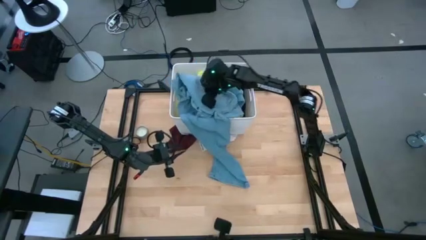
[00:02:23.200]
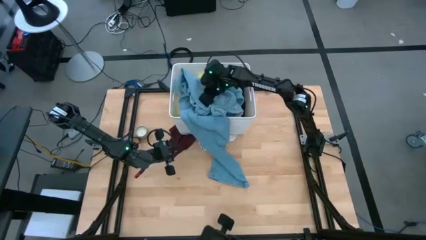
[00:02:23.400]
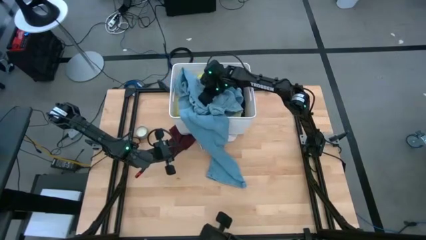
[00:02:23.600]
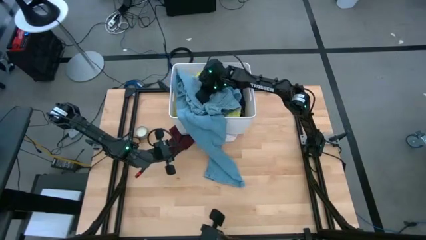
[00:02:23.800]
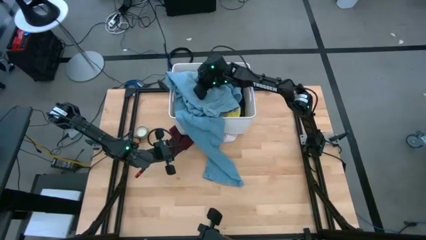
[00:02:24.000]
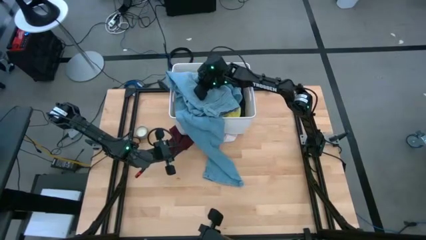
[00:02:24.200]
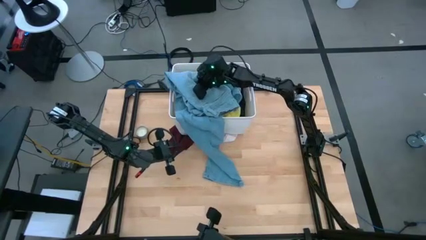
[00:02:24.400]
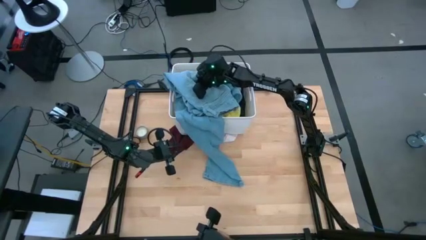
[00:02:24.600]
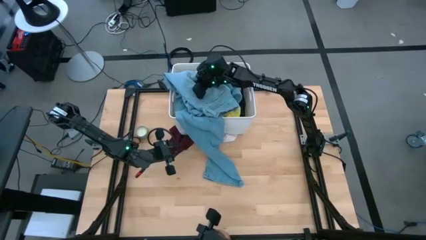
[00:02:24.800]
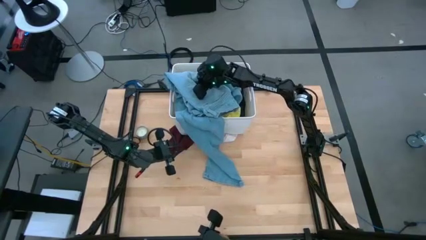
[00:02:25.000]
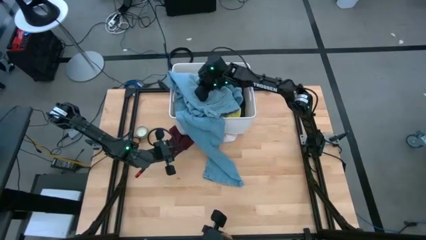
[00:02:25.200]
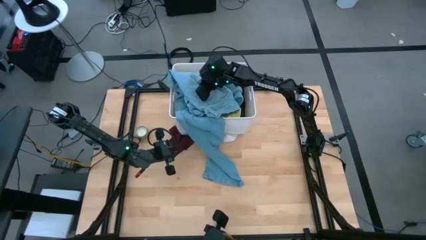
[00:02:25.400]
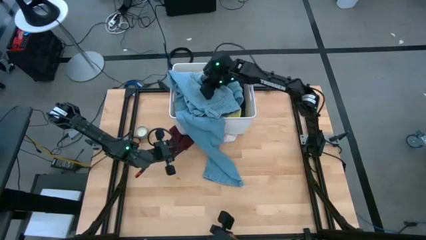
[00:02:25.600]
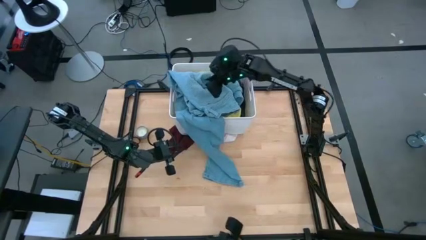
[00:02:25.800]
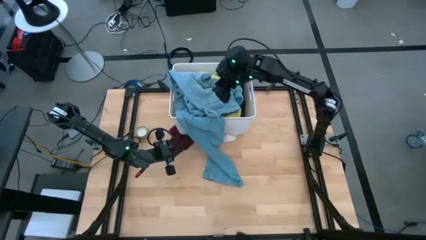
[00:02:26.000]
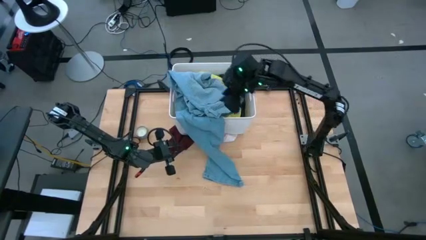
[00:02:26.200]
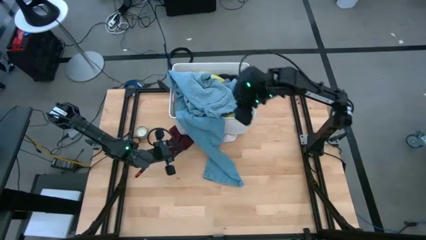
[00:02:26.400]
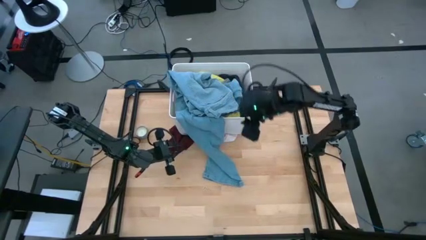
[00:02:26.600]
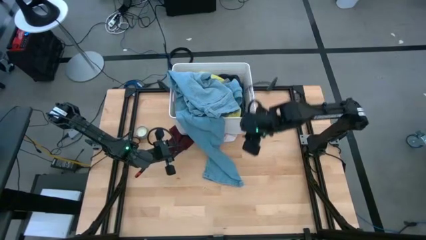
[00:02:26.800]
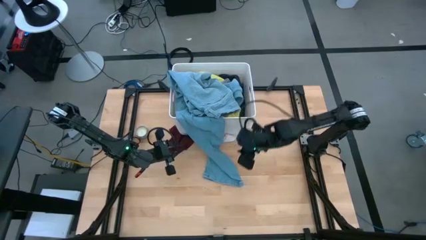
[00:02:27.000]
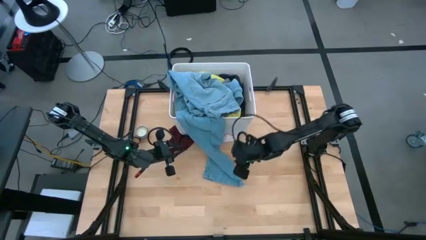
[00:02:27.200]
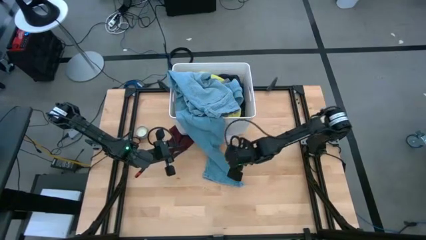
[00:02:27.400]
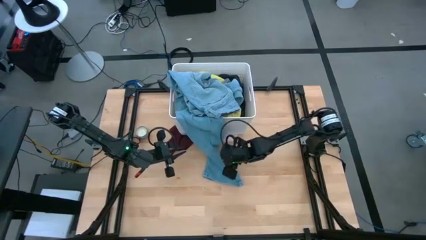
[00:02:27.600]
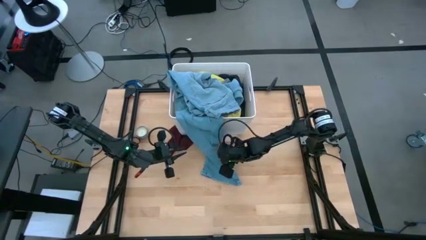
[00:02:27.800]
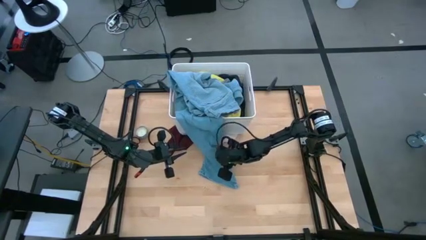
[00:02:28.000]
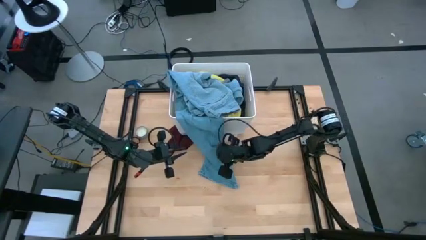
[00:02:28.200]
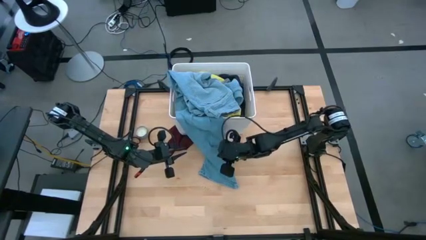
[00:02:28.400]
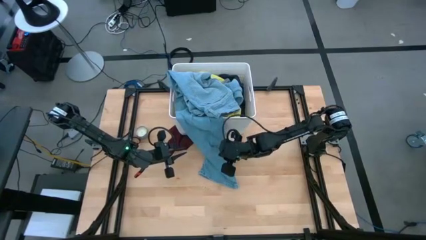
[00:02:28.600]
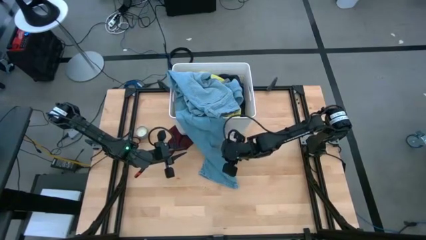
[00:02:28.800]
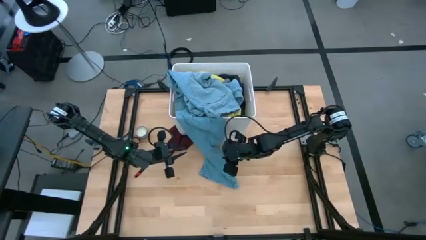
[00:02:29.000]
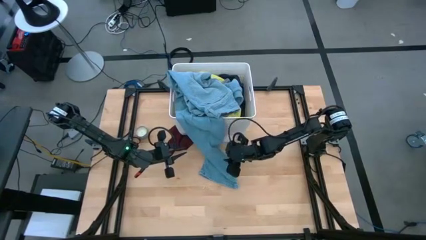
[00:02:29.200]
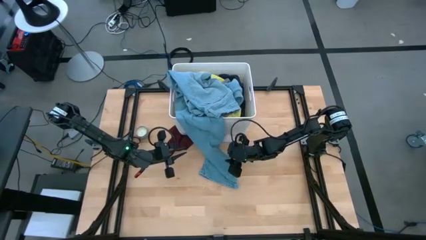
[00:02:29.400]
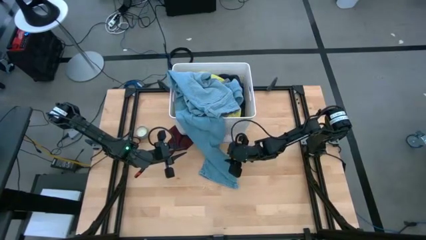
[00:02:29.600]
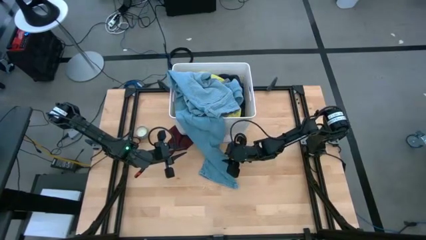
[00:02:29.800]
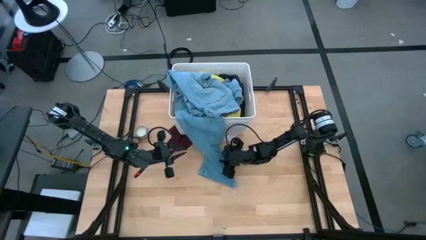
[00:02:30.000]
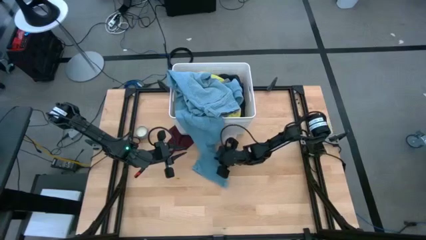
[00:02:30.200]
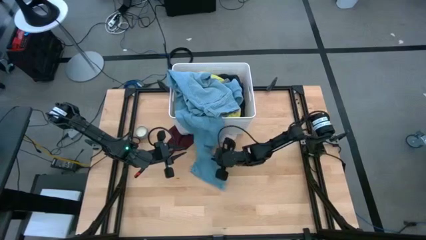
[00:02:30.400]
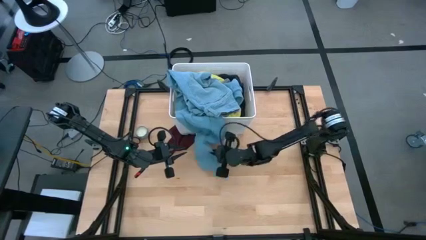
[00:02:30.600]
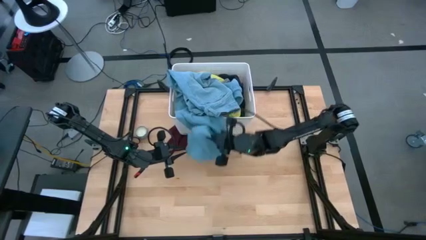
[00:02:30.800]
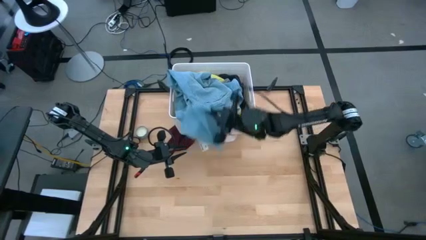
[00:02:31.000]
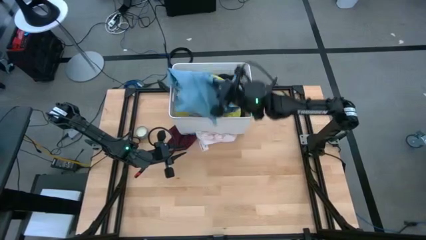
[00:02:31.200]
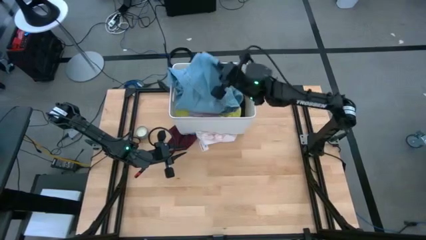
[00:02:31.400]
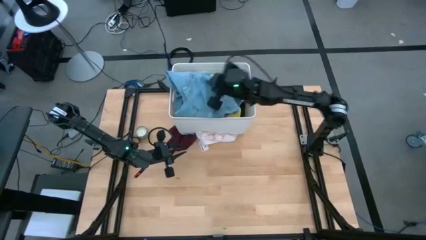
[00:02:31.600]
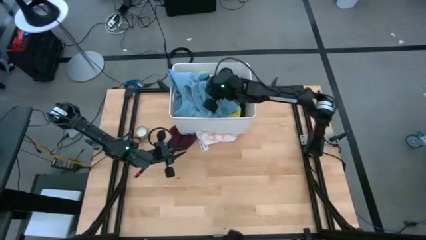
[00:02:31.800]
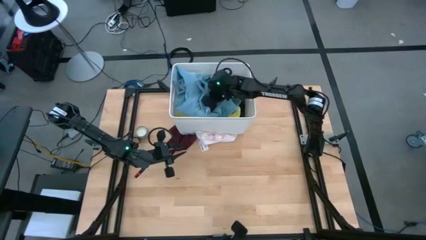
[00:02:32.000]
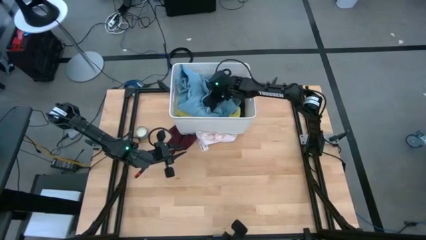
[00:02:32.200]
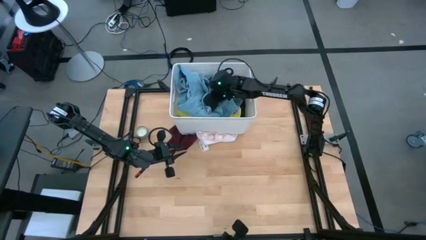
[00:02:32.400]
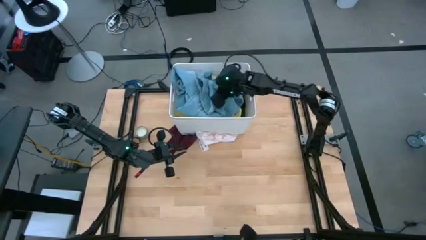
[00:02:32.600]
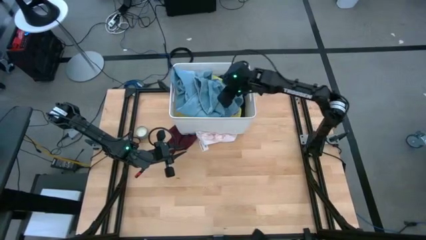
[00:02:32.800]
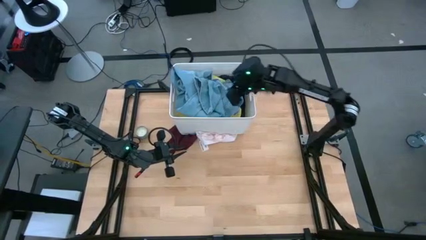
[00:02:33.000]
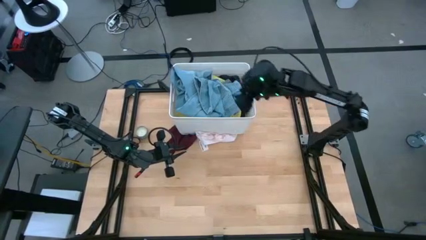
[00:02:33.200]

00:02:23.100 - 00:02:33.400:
Task: Sort clothes
Put the blue jeans into the white laundry bin

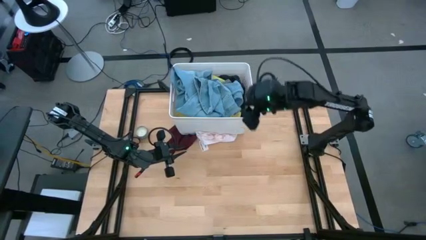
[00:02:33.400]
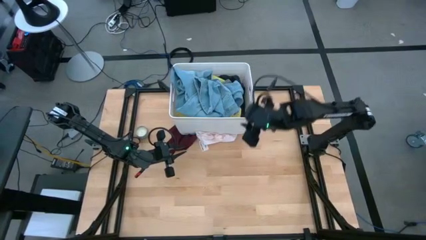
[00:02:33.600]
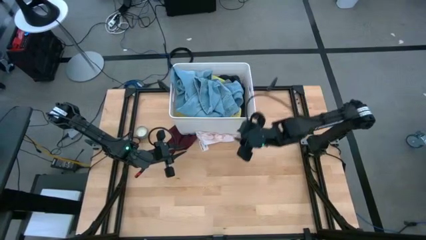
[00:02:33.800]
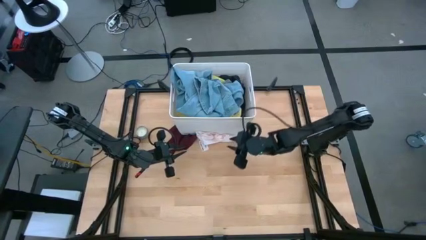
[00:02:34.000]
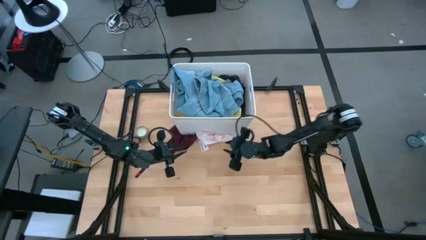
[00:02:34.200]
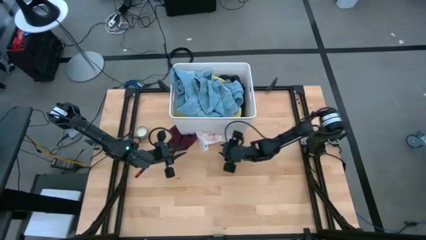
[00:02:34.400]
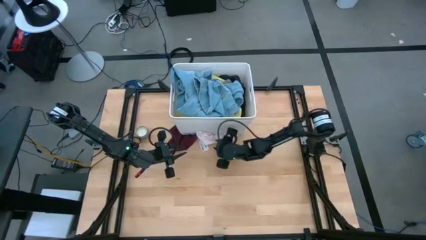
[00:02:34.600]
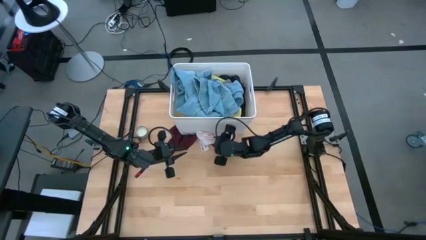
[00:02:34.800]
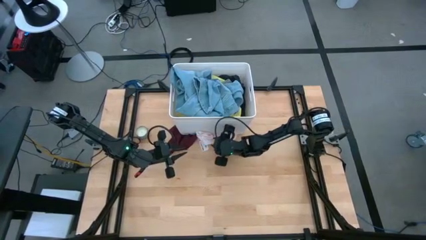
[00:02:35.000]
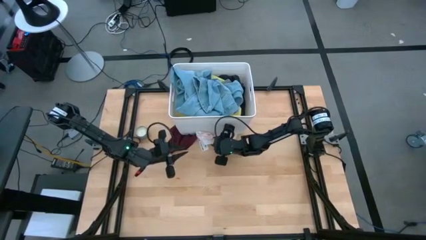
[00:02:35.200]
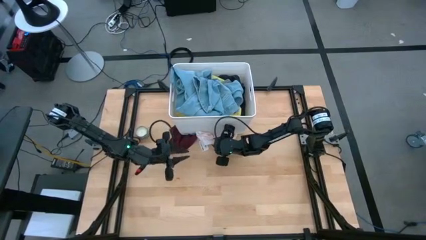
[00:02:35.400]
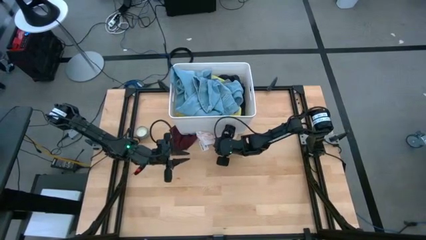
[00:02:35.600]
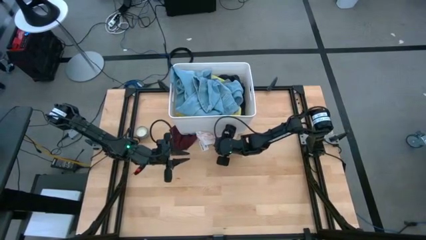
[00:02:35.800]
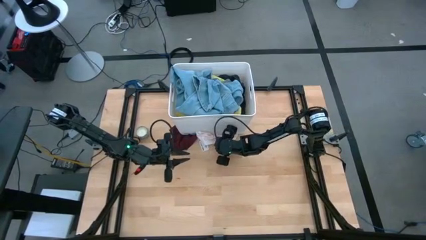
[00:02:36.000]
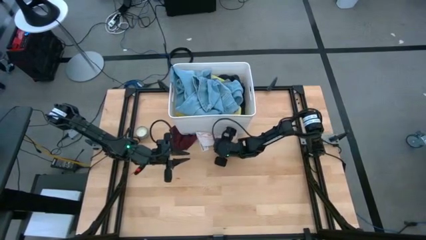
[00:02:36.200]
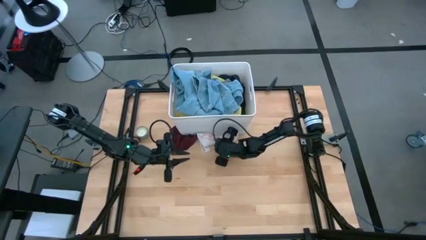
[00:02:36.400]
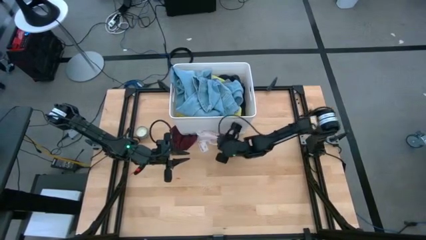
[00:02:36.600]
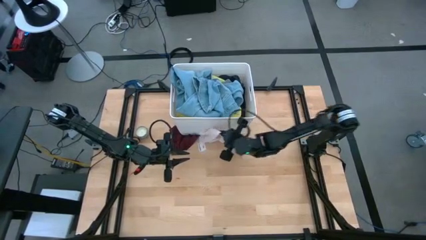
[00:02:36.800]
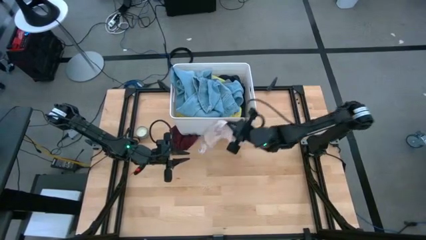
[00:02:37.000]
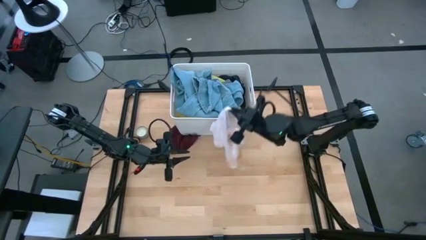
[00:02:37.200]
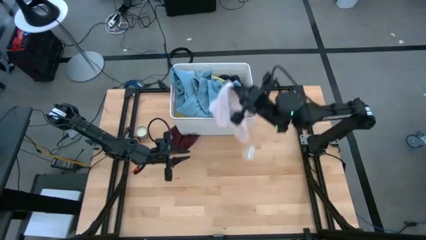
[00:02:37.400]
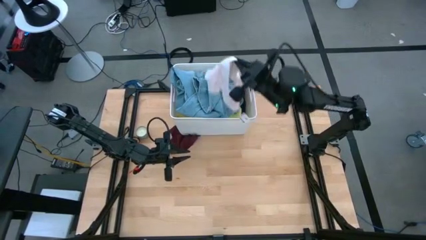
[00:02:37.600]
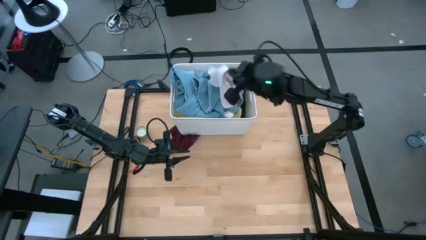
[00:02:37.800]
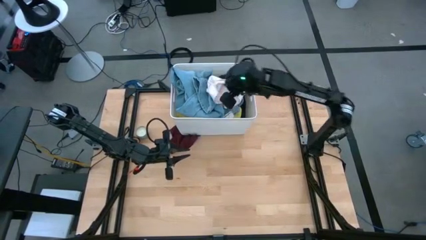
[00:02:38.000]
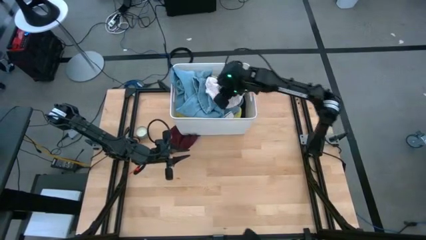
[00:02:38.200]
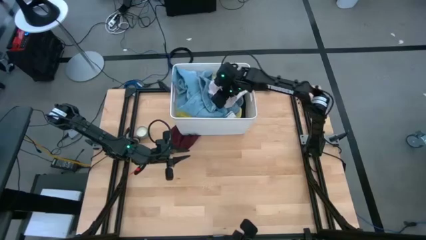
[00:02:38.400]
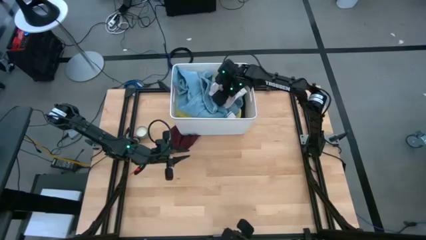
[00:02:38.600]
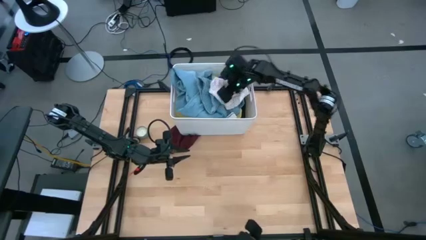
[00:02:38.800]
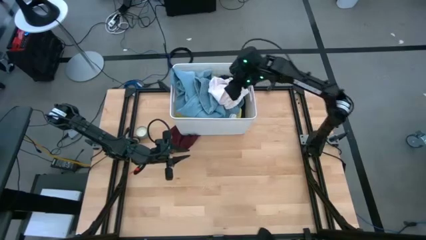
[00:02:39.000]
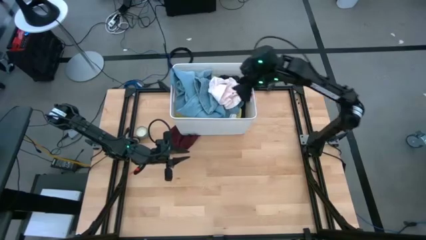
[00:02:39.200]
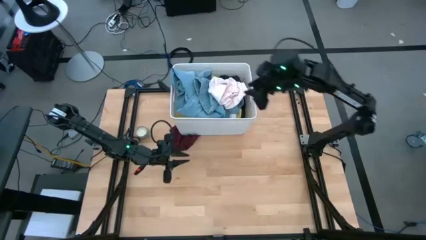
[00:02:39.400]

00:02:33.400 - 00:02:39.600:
Put the pink underwear into the white laundry bin
